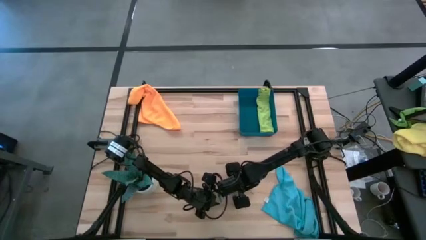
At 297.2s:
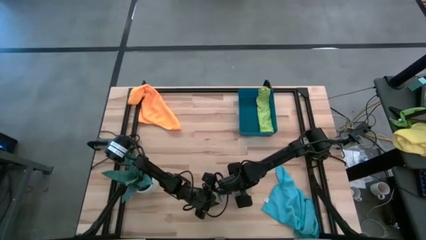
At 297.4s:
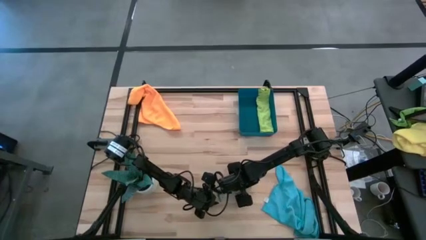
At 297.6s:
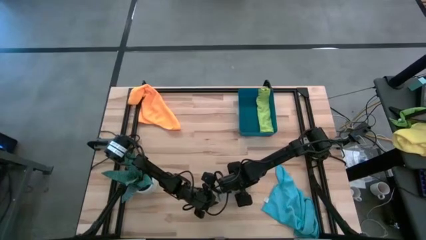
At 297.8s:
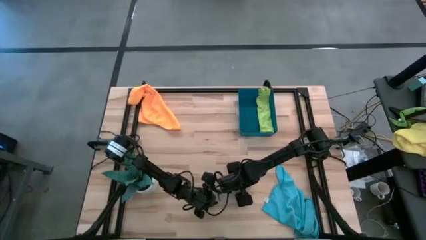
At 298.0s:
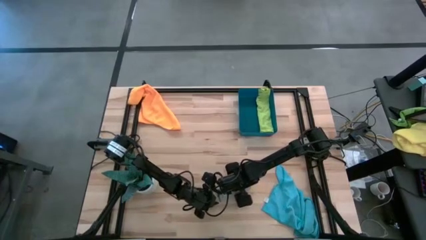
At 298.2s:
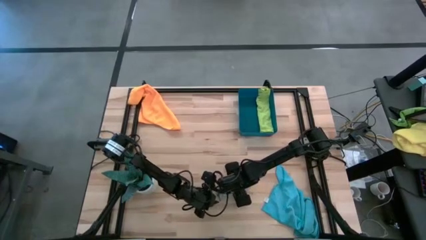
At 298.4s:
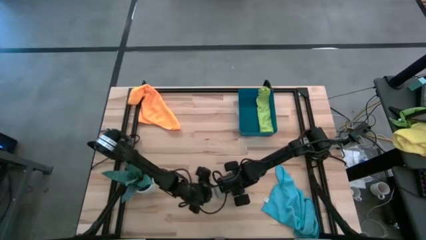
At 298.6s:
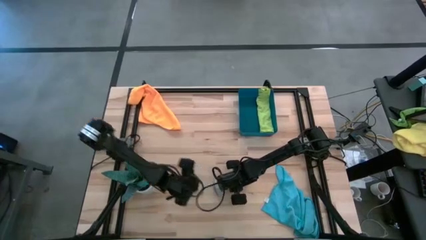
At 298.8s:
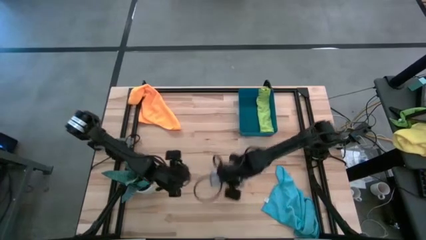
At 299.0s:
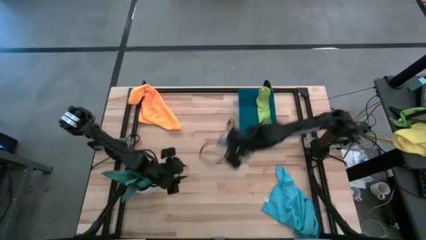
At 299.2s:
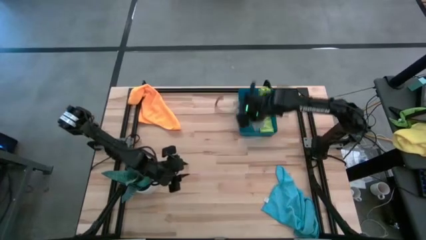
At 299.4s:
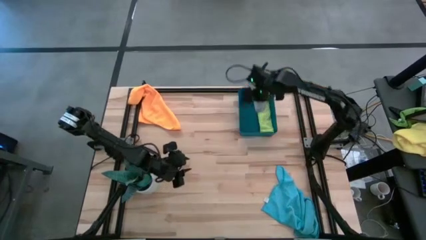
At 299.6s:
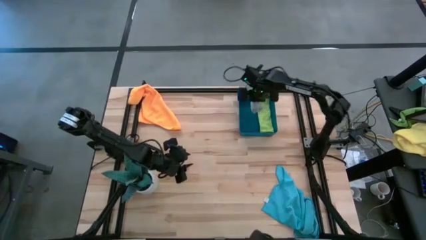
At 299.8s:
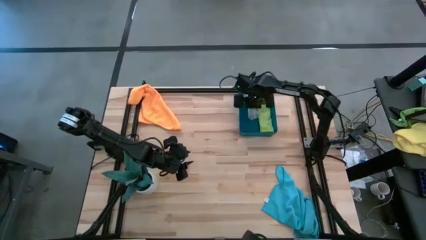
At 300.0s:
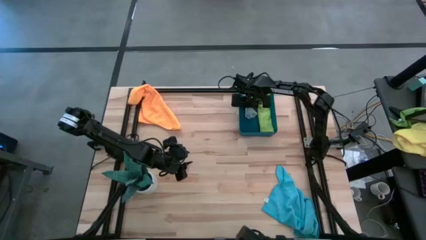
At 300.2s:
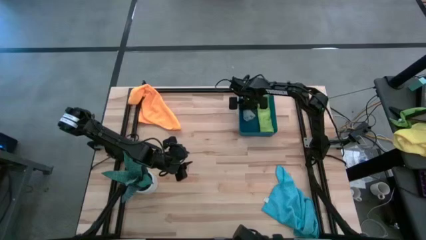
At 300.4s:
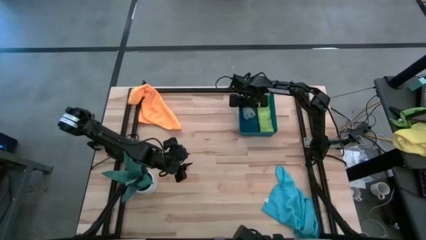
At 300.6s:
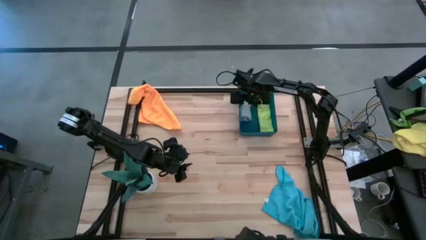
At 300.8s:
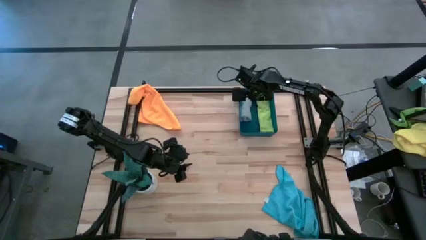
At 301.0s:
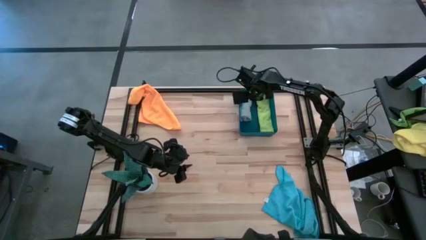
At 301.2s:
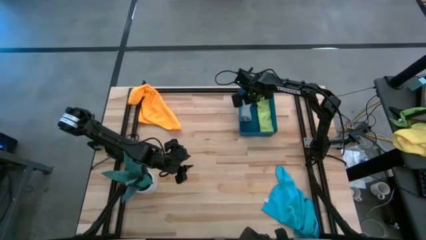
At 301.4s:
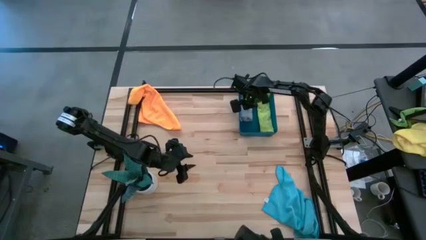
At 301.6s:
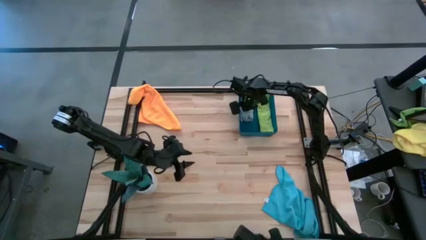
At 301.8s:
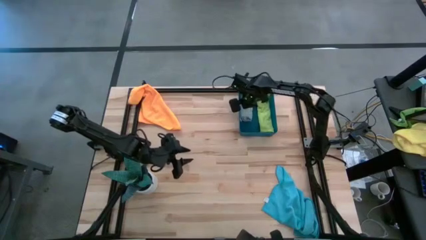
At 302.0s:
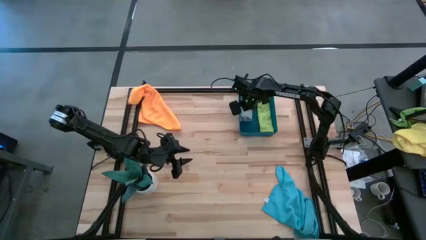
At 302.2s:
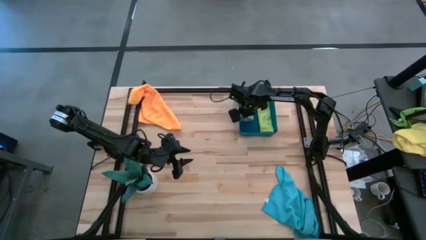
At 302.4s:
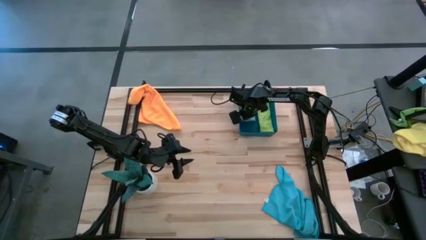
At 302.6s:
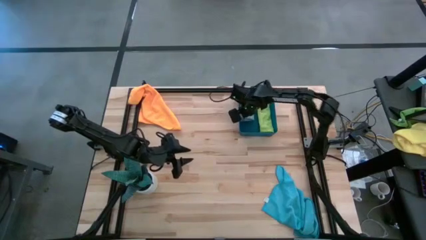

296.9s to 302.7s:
Task: Roll microfiber towels into tight, uniform cylinder then place into a basket
Put the gray towel into the blue bin

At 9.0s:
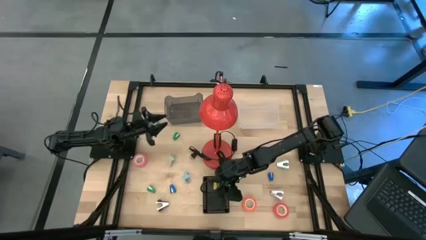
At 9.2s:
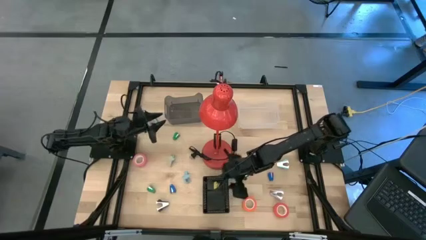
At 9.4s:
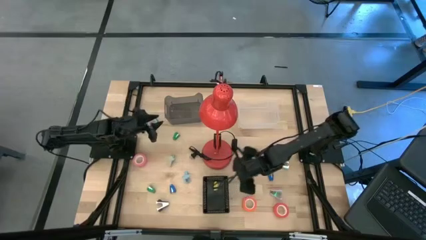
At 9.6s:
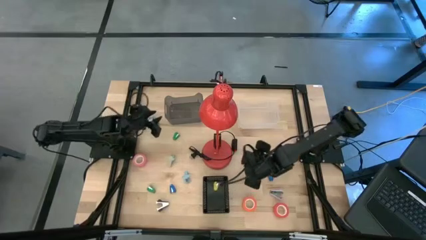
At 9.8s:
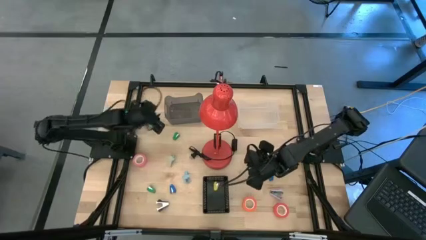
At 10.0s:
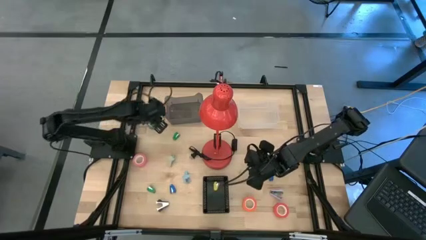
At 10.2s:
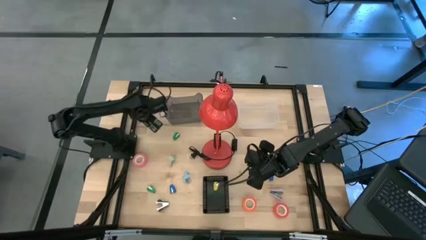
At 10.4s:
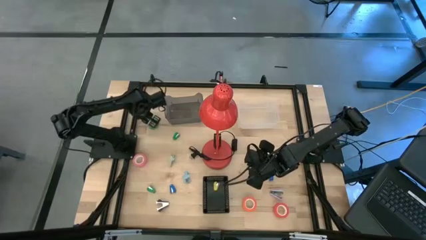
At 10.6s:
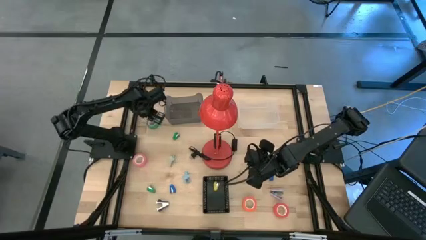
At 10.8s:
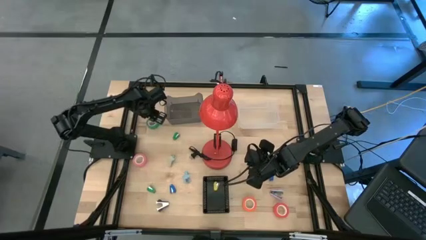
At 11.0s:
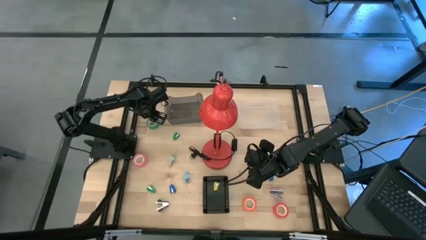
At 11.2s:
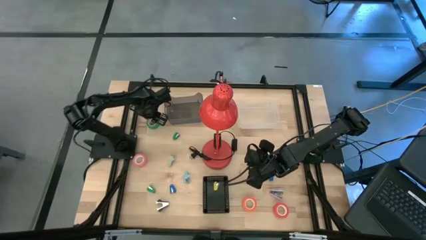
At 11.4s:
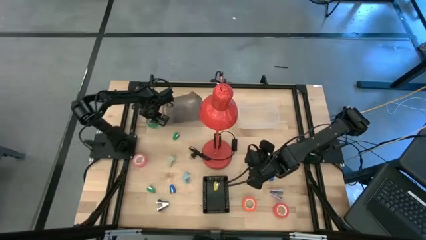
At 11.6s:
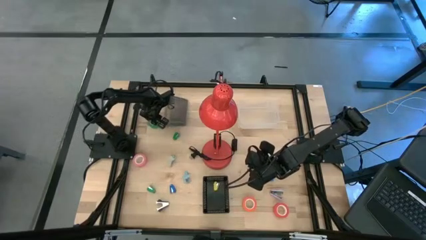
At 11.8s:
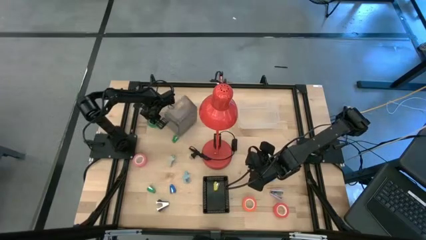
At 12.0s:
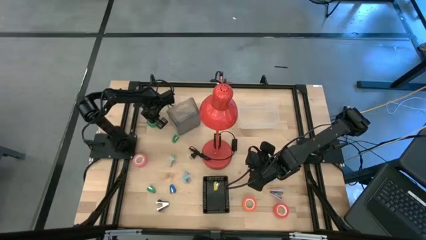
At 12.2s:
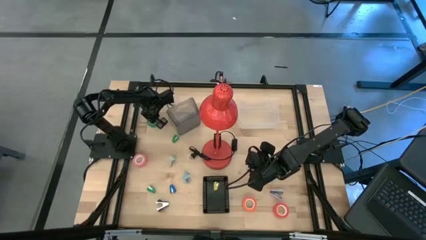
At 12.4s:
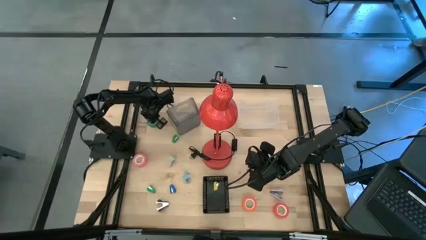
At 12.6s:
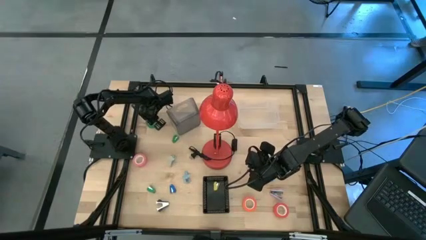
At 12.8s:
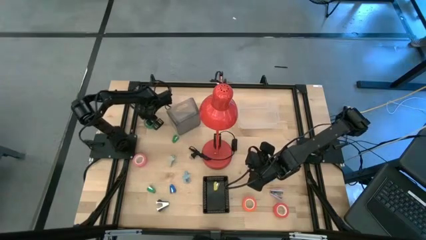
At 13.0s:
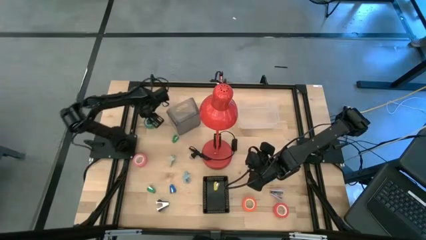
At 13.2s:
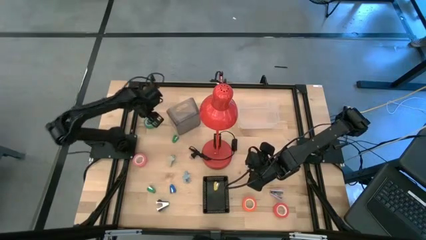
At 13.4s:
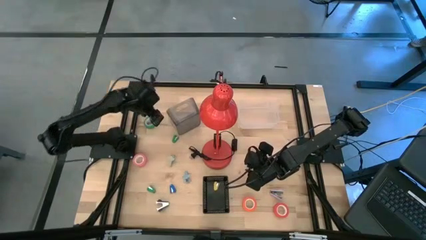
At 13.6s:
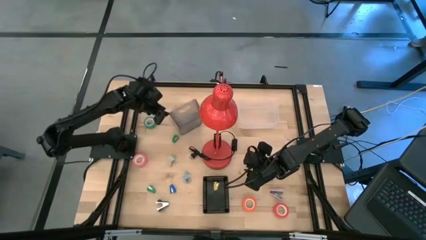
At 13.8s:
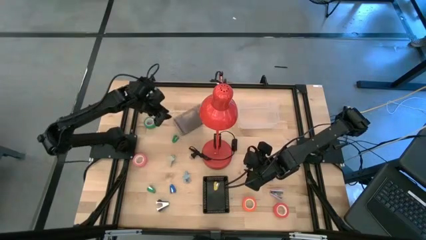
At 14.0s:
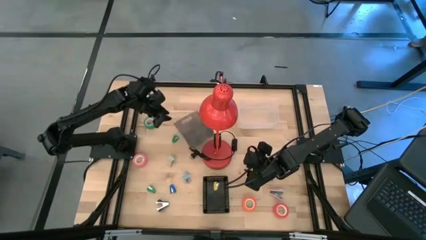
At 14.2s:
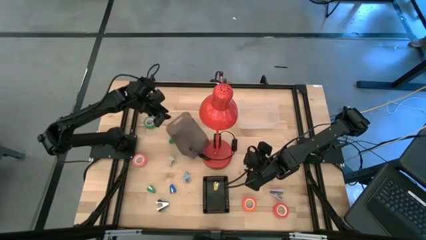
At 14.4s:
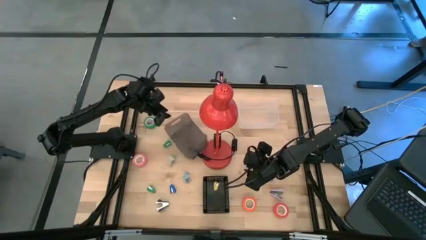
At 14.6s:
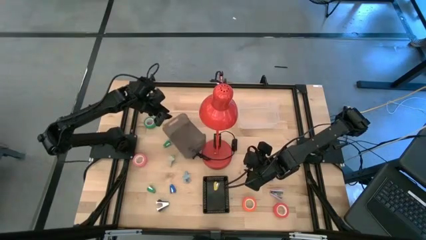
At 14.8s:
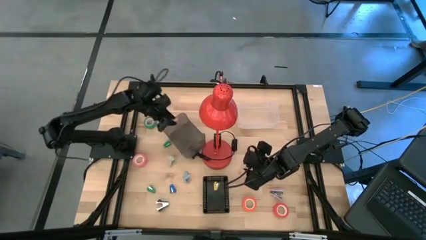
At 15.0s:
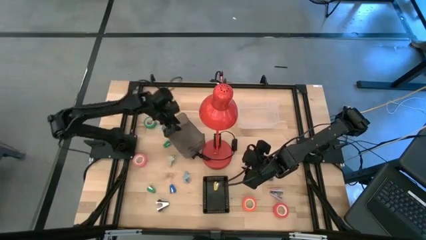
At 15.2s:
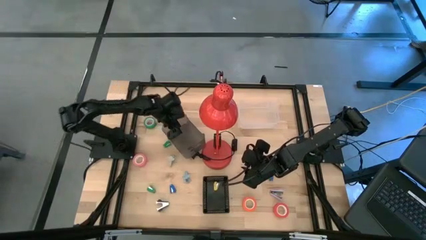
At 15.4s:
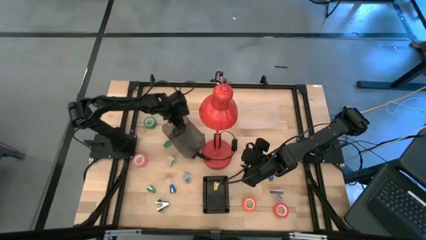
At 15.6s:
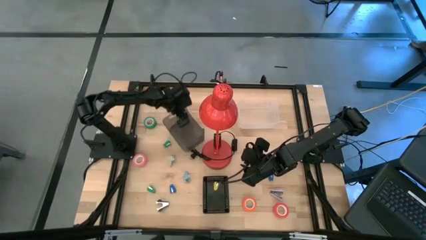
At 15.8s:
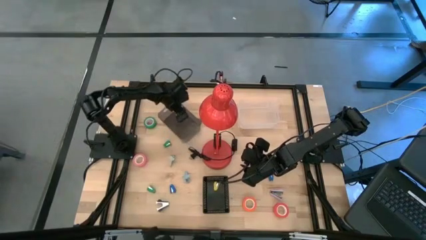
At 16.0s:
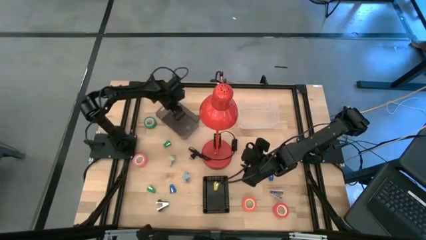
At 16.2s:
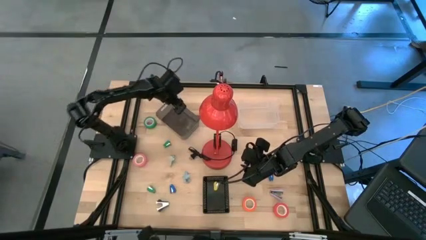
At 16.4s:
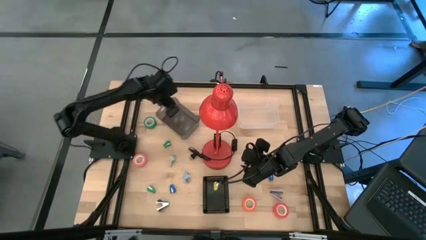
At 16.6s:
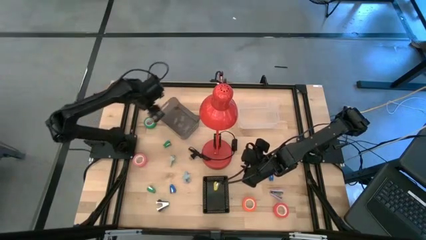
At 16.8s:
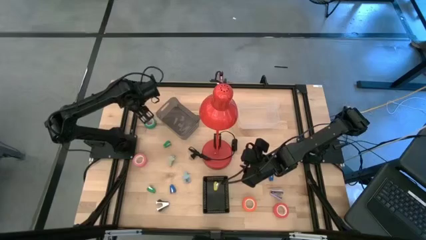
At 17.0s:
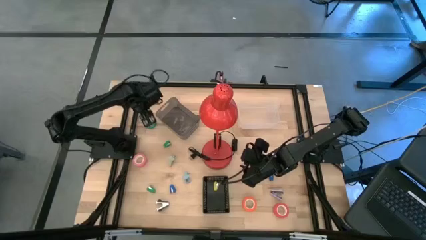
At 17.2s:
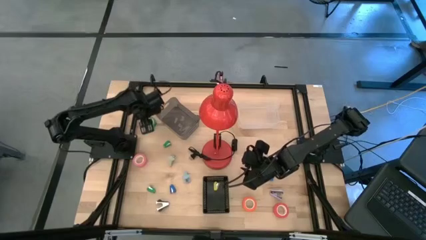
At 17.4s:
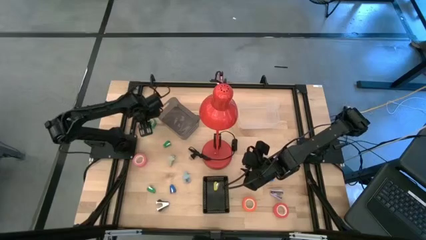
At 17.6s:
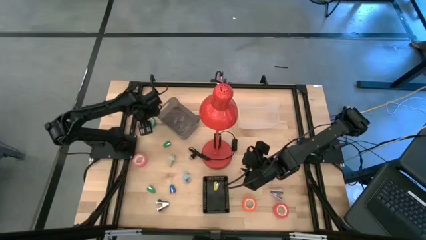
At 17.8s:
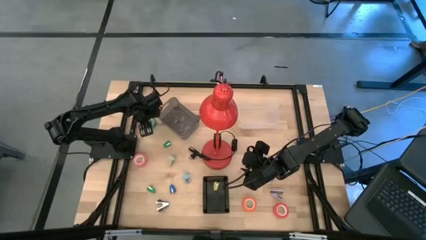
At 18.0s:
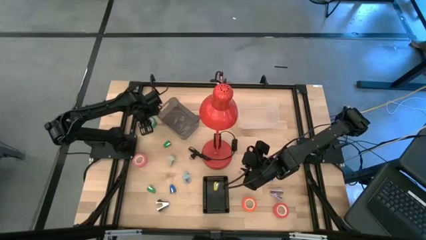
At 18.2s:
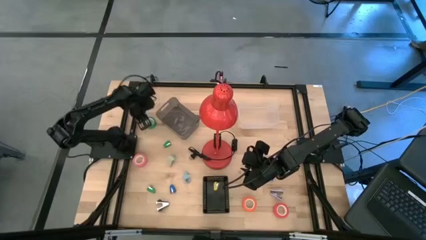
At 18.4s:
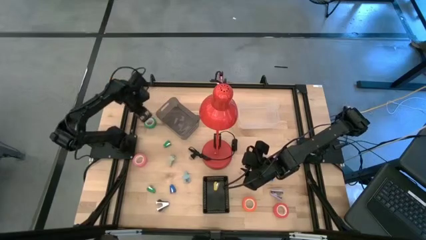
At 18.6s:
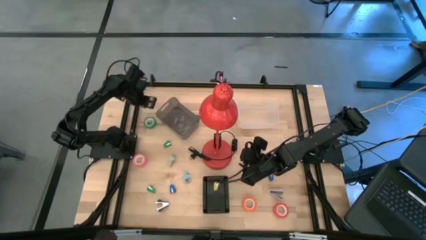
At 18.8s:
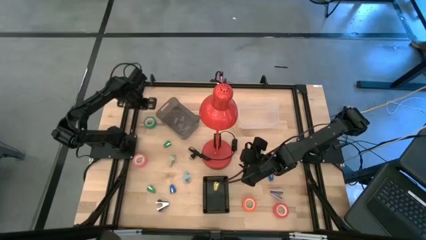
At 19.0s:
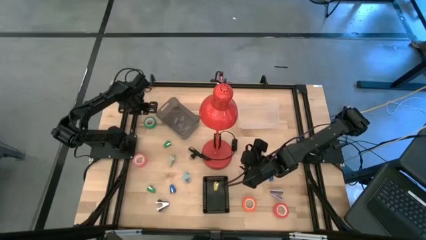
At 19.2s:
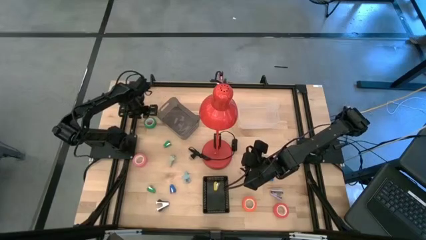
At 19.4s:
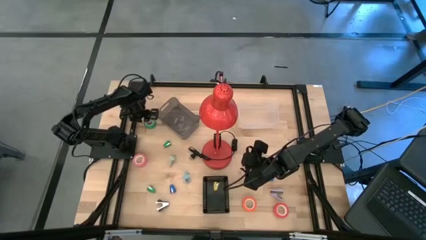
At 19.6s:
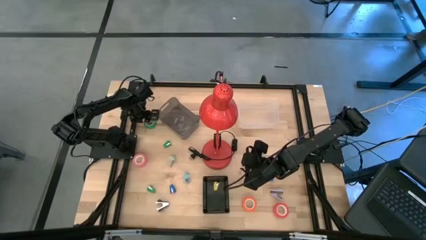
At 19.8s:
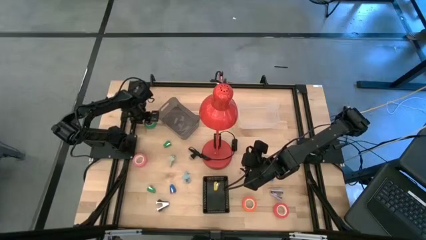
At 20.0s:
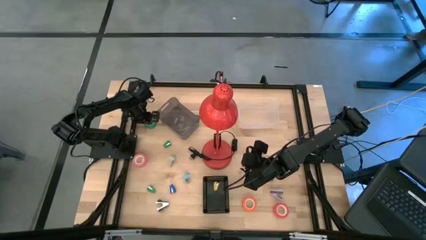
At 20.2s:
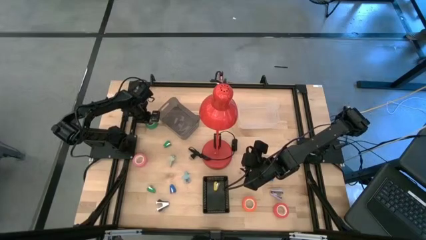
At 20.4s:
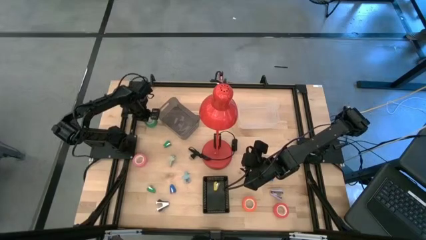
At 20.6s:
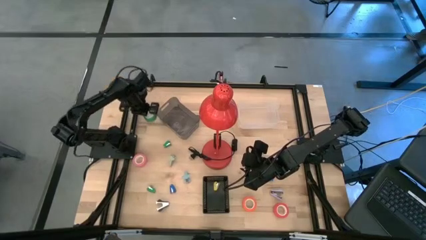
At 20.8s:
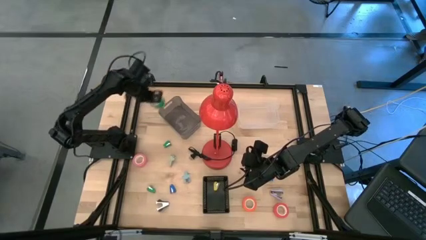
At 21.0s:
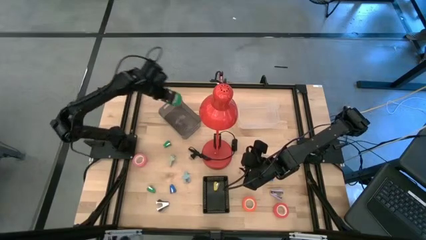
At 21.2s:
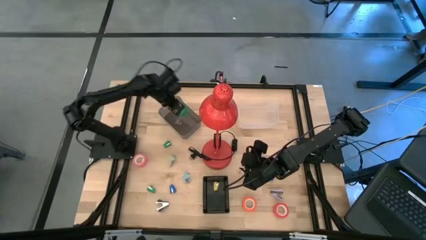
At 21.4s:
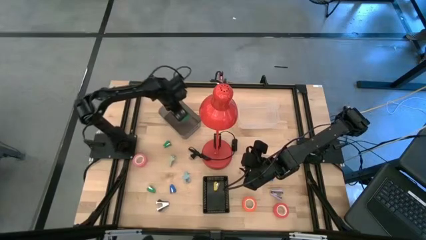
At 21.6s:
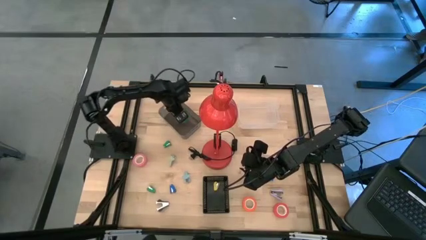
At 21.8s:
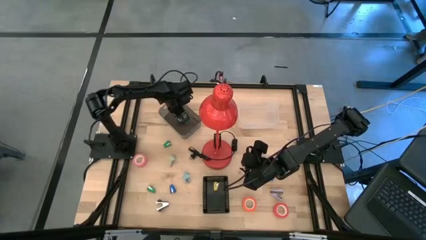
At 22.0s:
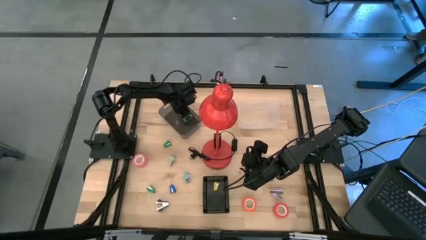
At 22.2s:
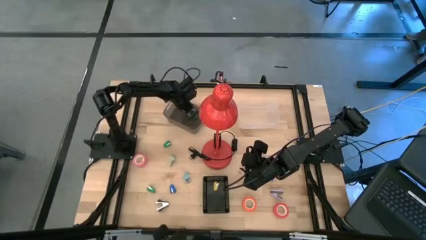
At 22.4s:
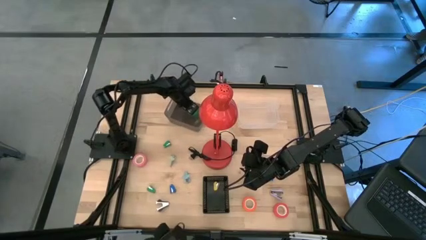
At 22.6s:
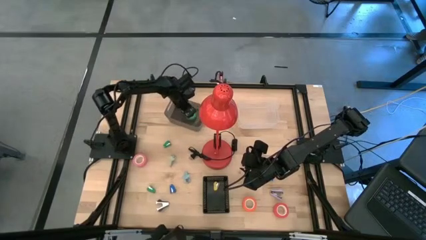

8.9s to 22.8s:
Task: Pick and place Stapler, Stapler remover, tape
Put the dark green tape into the black transparent bin
